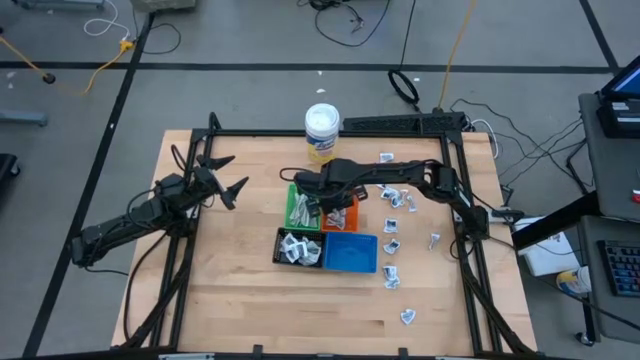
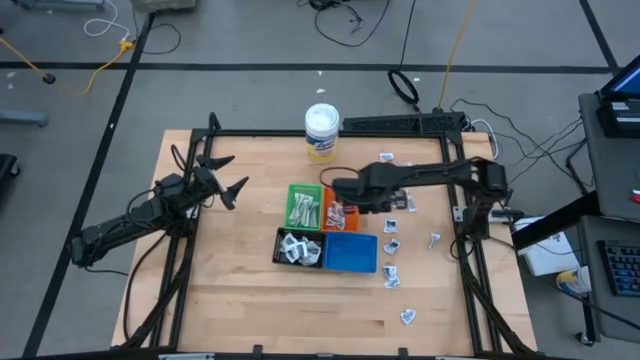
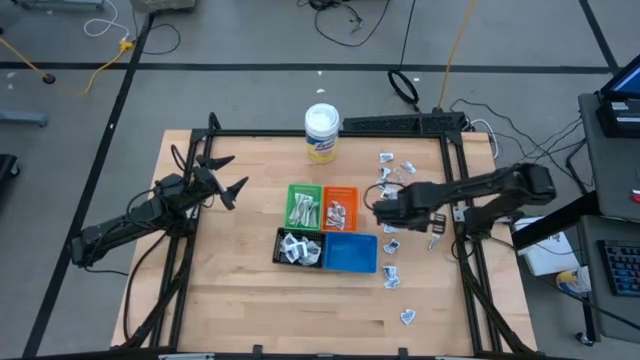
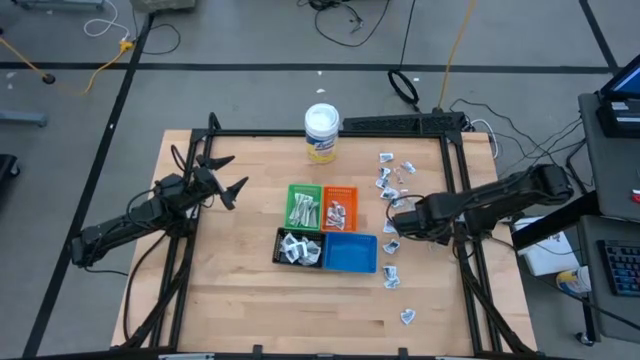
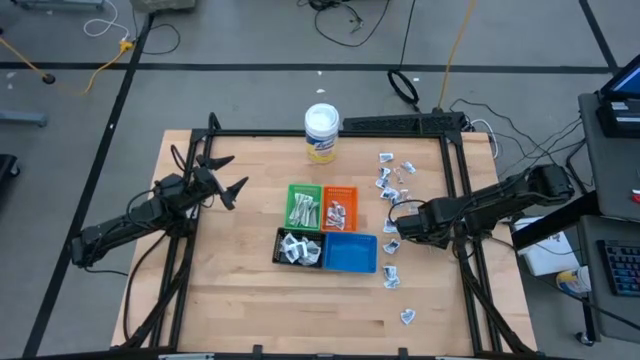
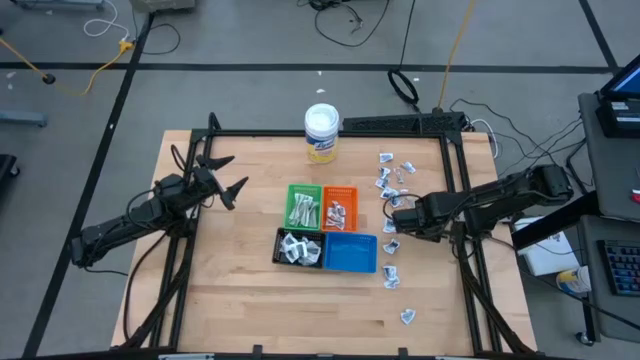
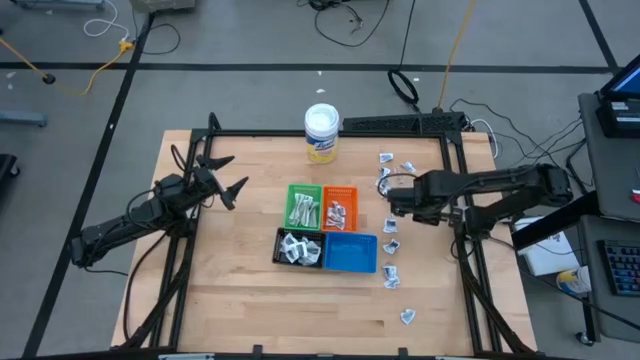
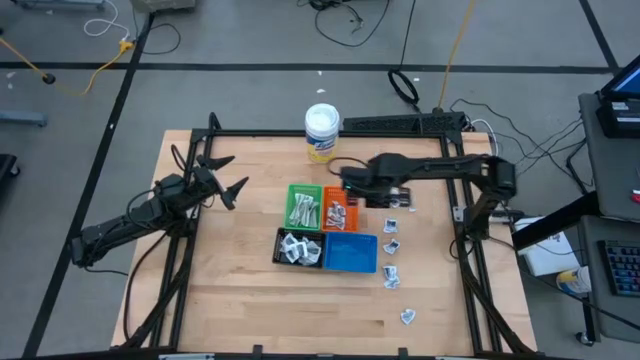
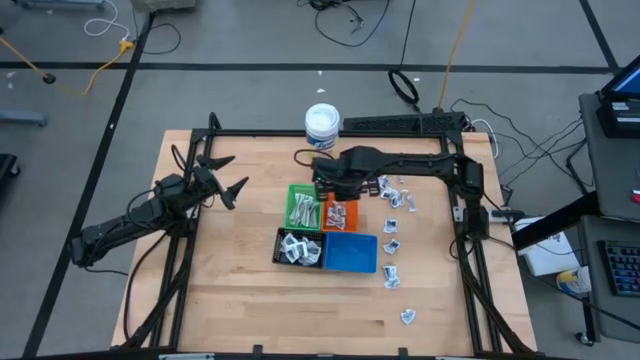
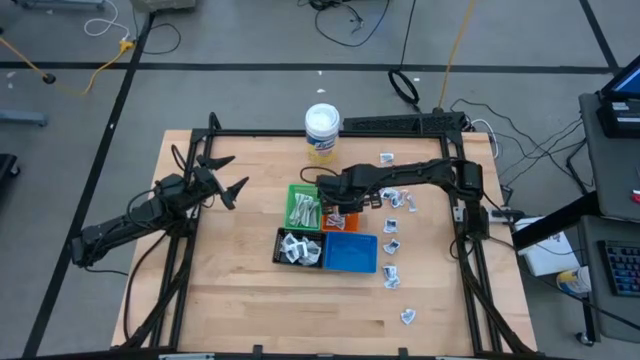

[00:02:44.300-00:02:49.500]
Task: Pick & Place First Aid Supplies
Put the ointment pack into the orange bin

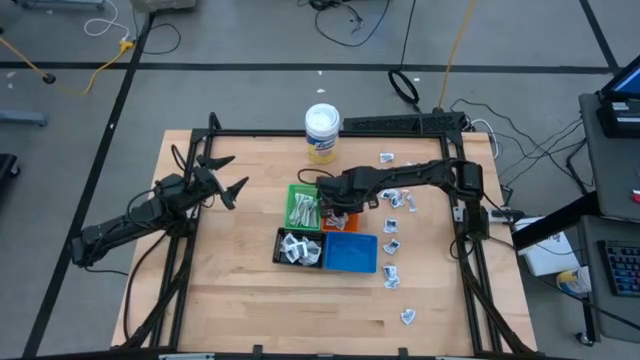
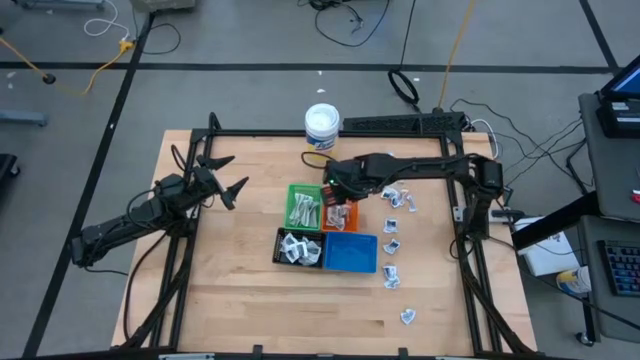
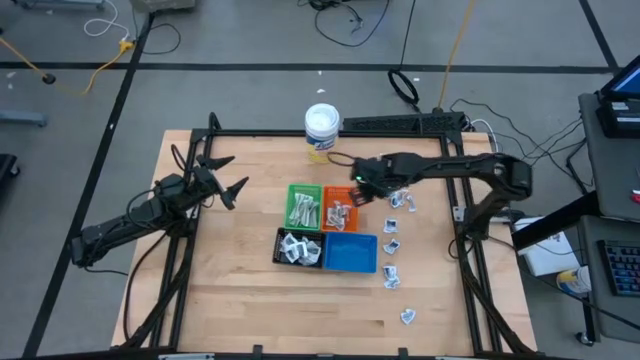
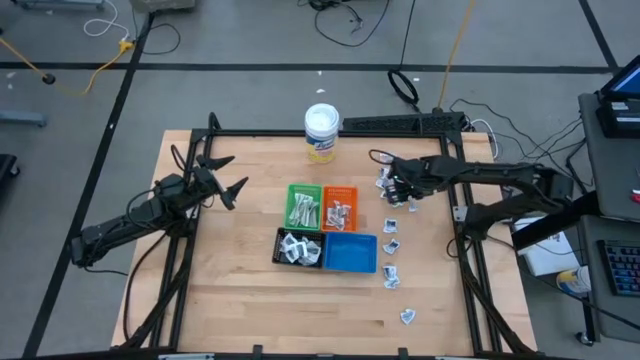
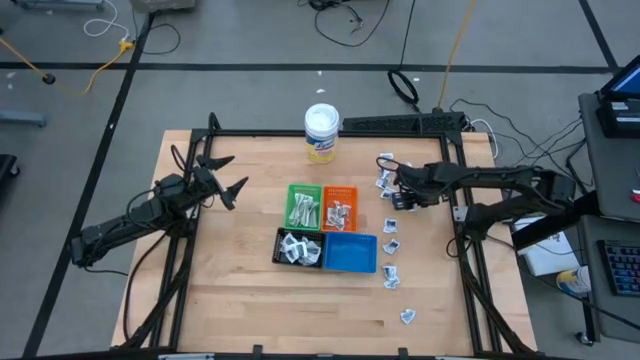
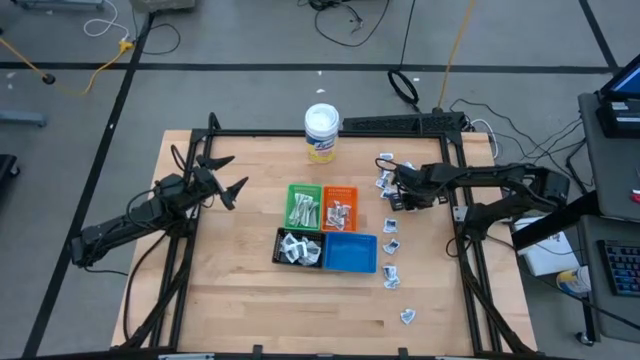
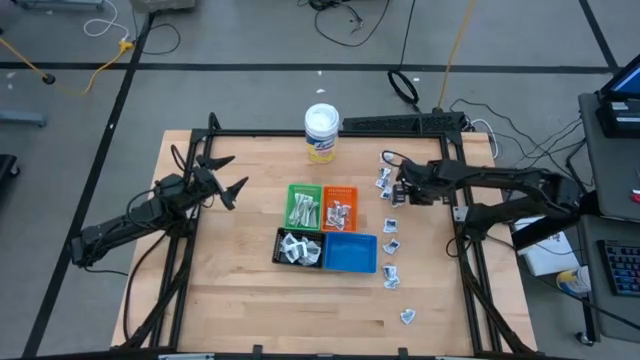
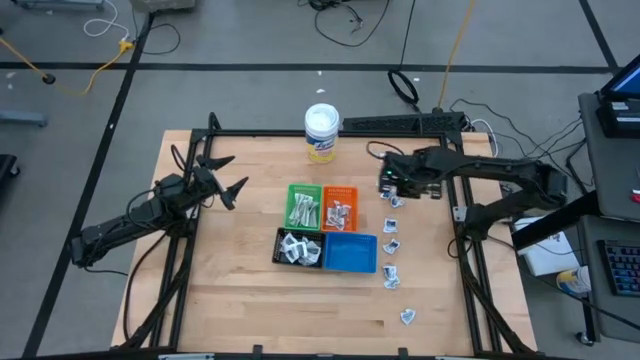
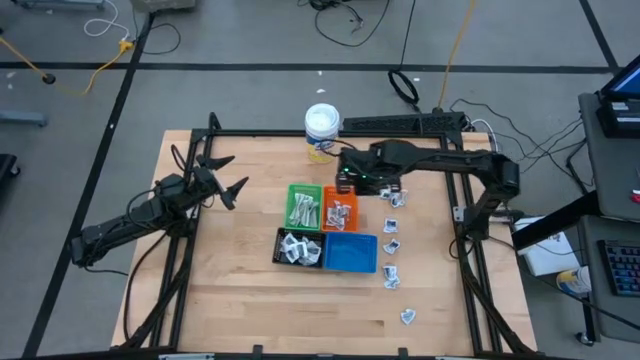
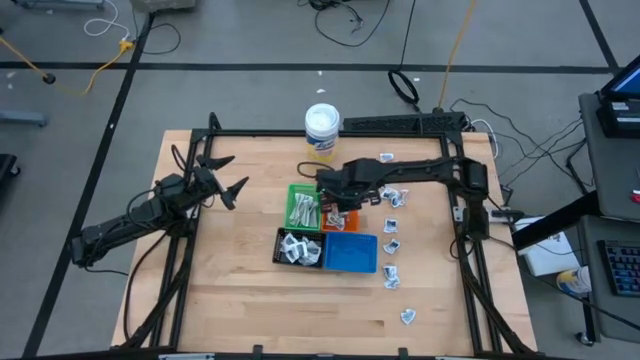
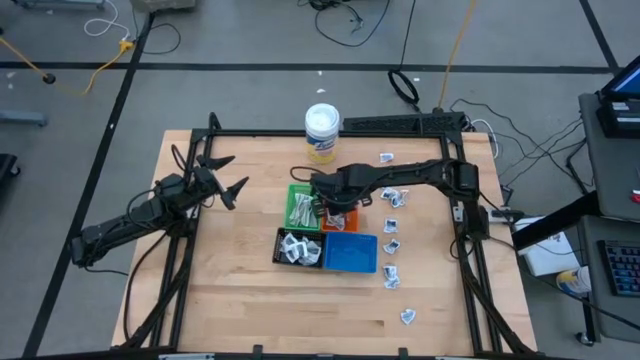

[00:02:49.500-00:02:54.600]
Put the ointment pack into the orange bin

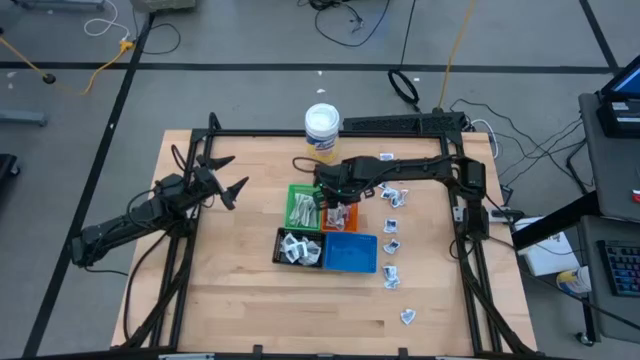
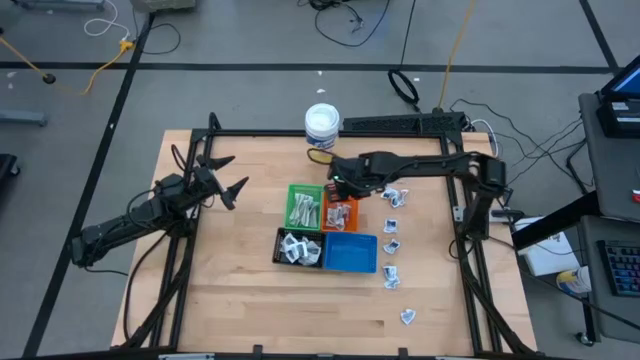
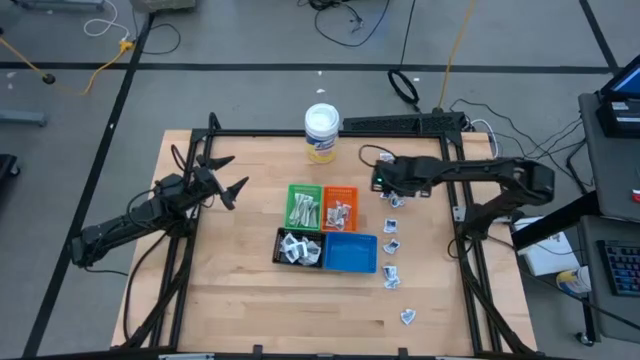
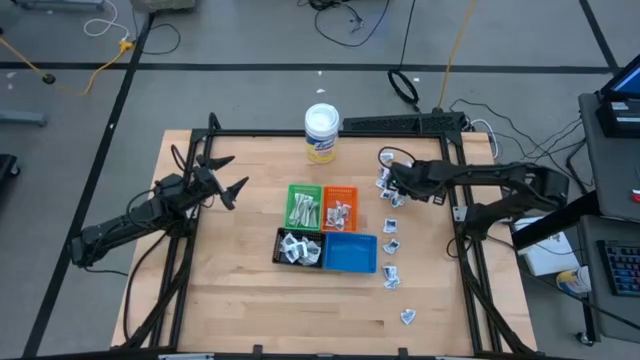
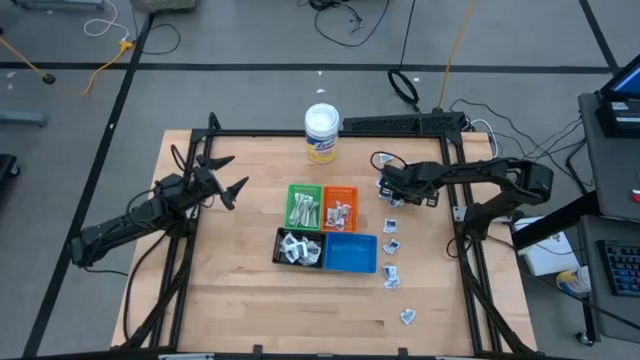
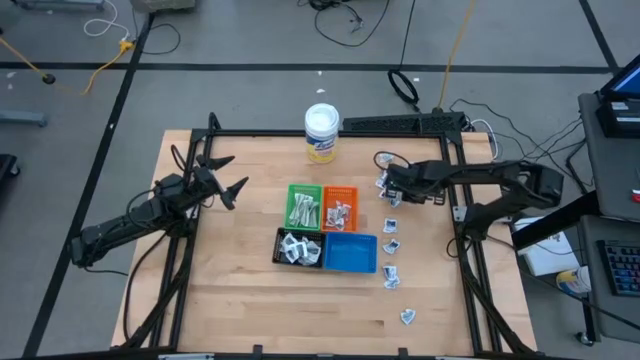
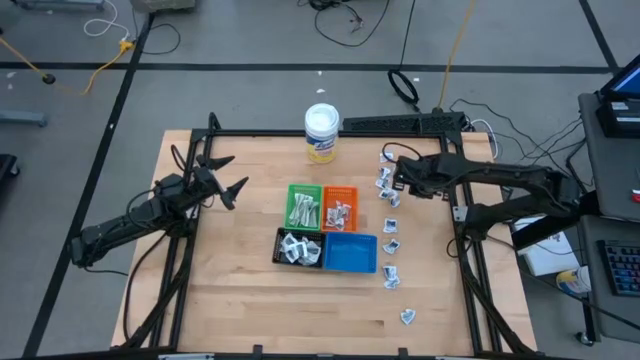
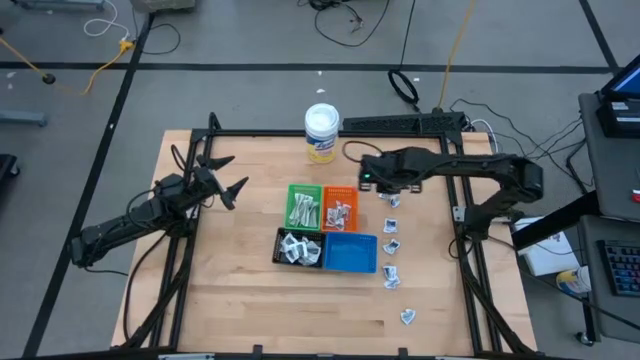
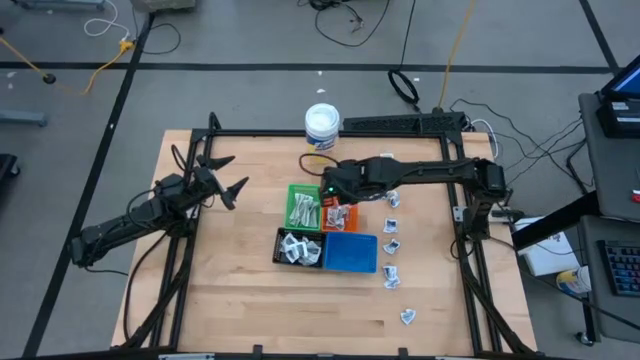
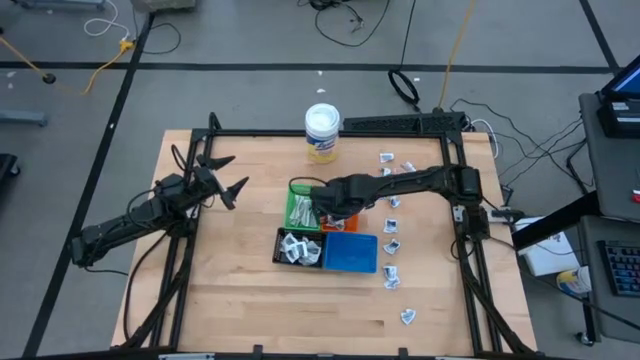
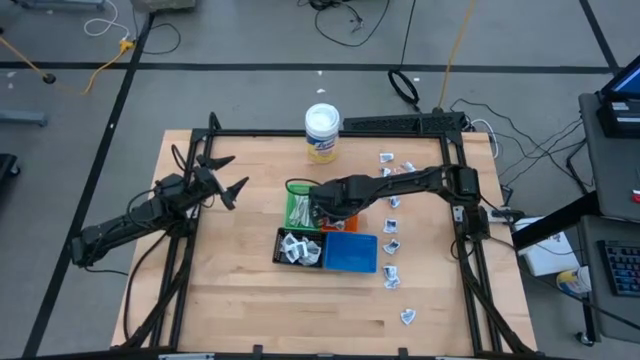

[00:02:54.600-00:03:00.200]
Put the ointment pack into the orange bin

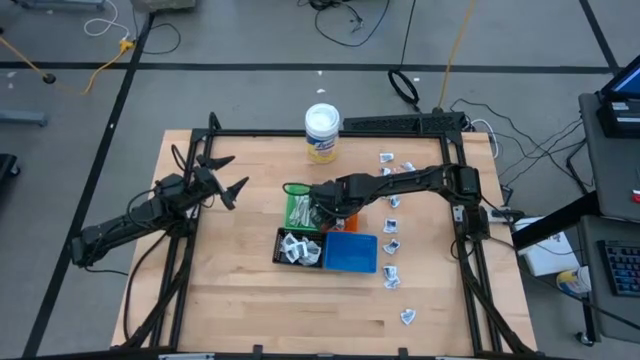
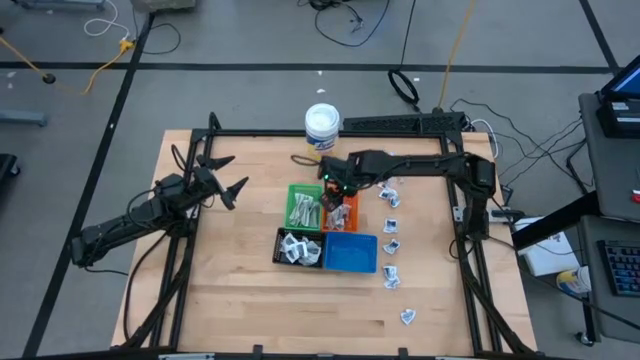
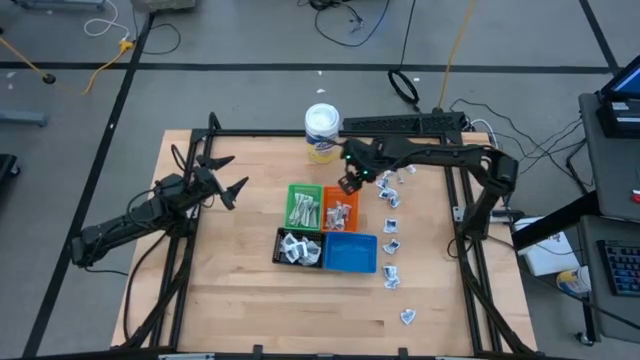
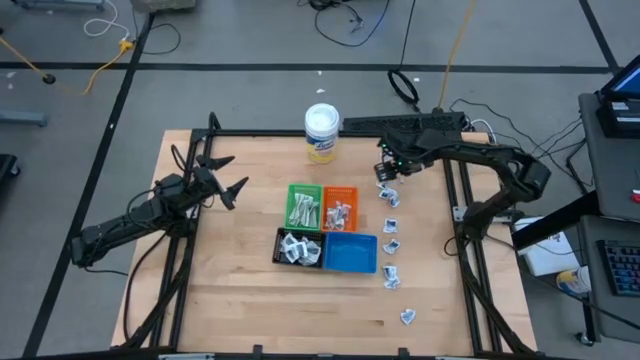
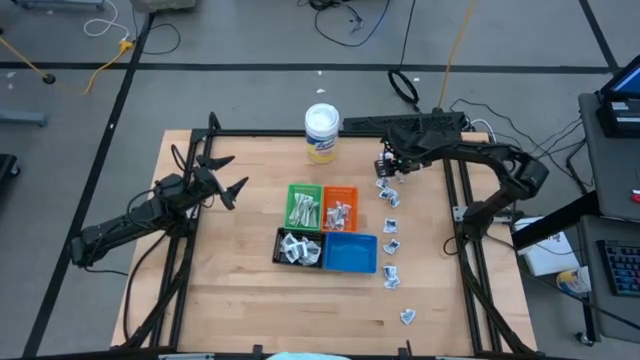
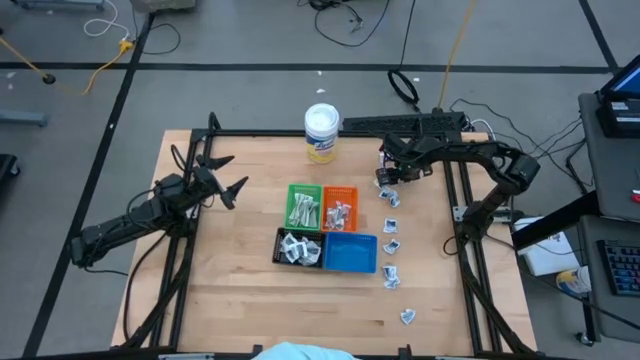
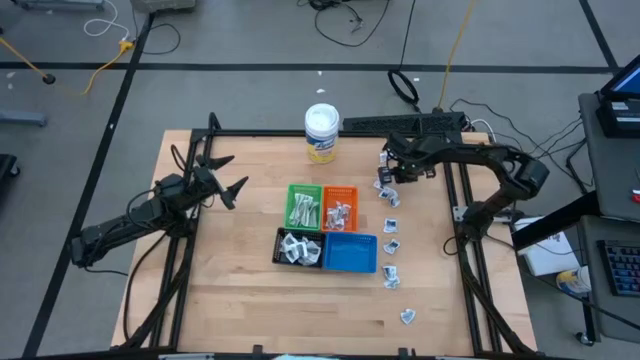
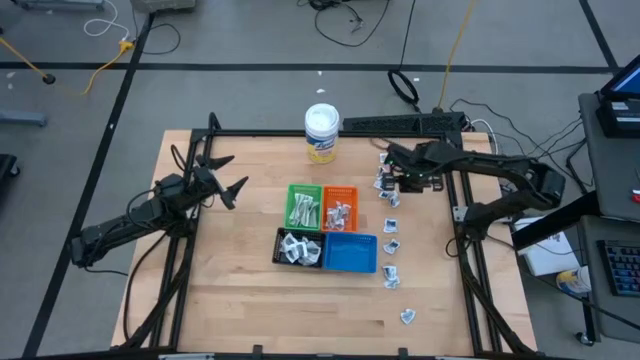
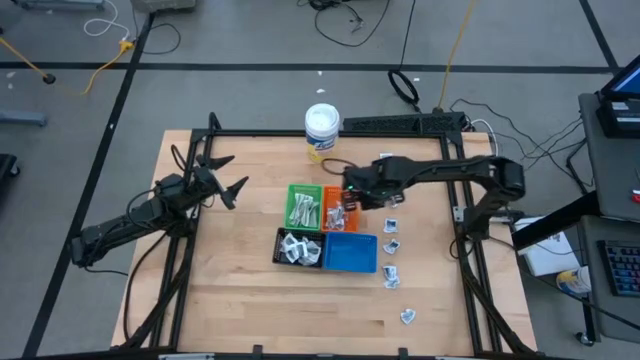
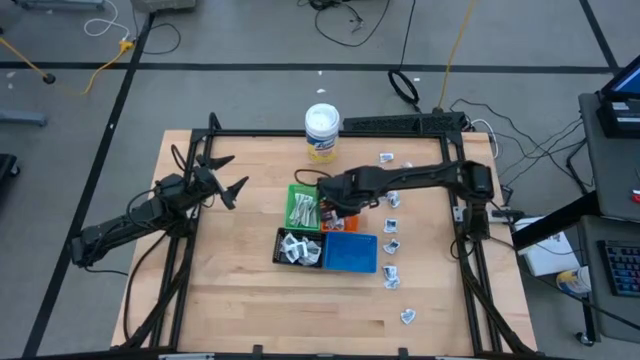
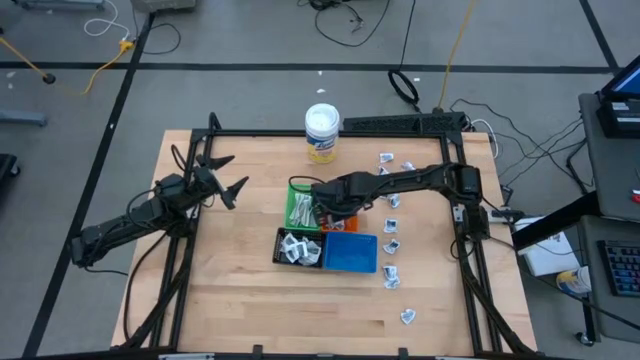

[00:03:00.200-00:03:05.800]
Put the ointment pack into the orange bin
